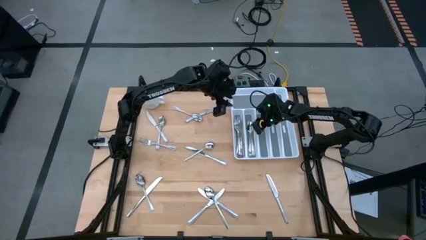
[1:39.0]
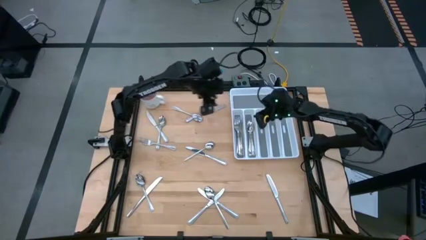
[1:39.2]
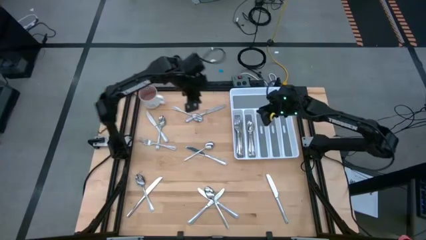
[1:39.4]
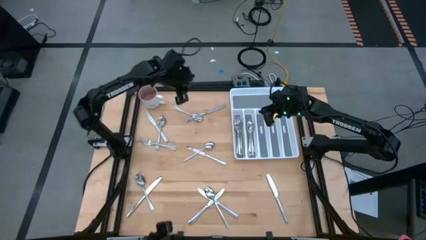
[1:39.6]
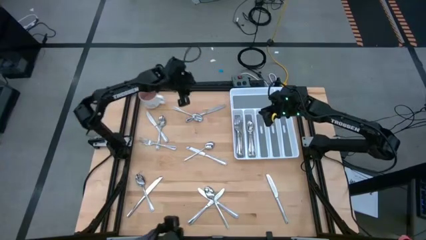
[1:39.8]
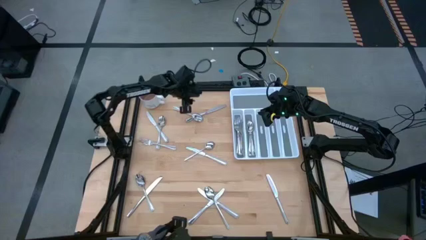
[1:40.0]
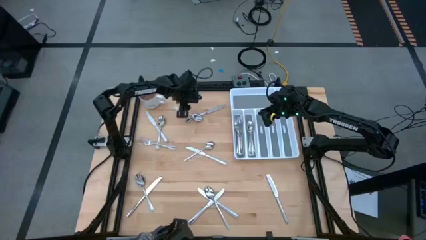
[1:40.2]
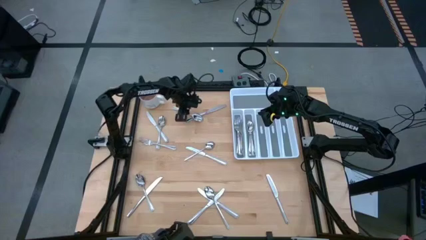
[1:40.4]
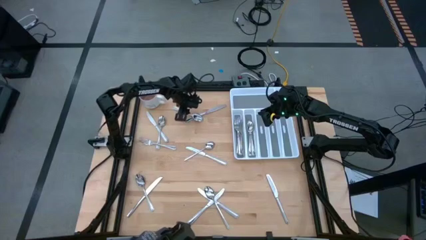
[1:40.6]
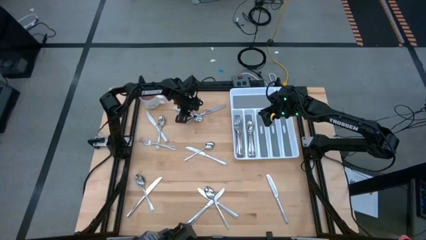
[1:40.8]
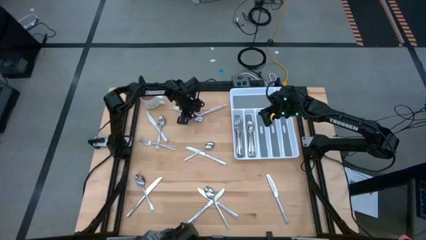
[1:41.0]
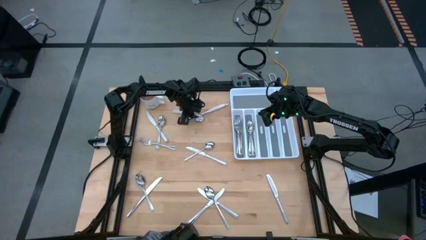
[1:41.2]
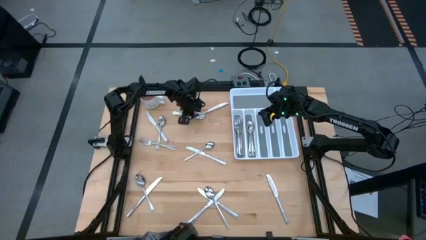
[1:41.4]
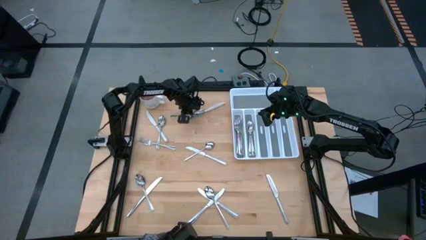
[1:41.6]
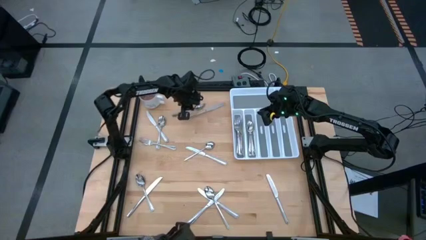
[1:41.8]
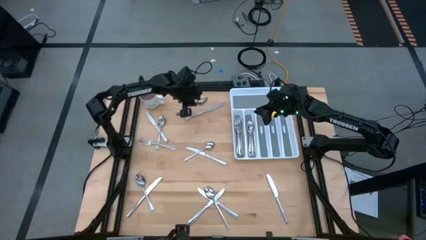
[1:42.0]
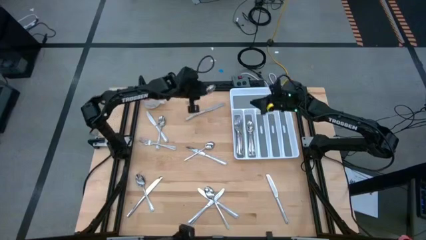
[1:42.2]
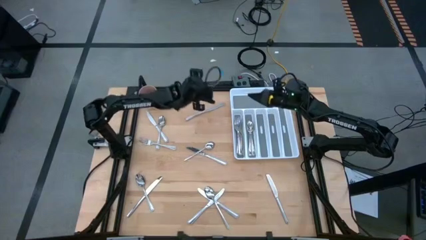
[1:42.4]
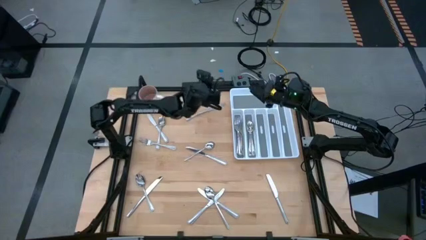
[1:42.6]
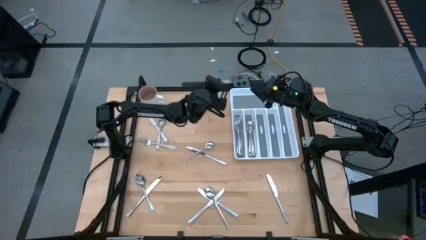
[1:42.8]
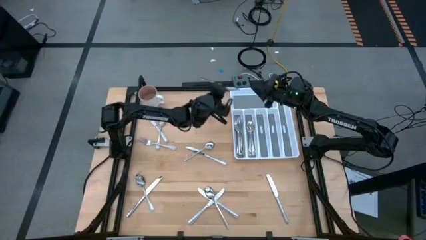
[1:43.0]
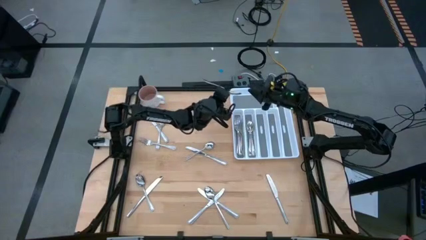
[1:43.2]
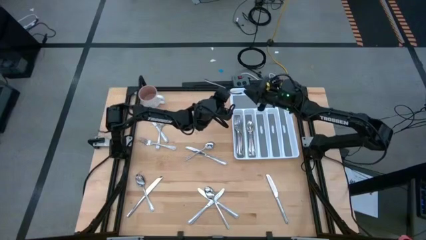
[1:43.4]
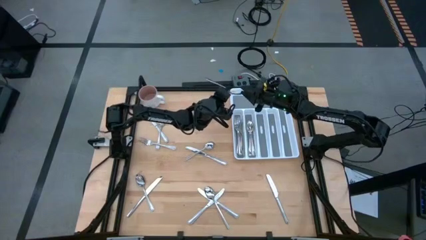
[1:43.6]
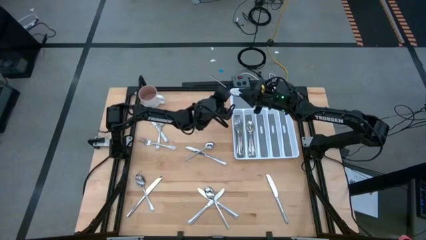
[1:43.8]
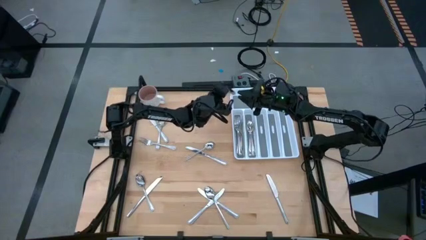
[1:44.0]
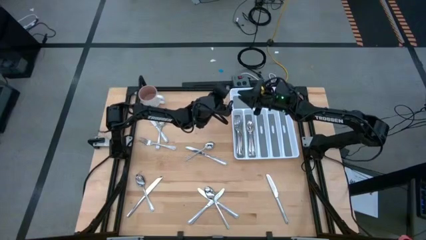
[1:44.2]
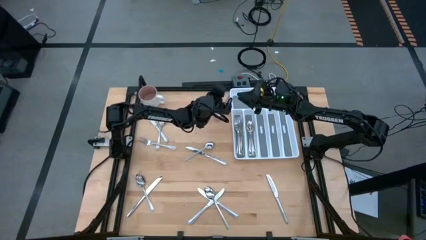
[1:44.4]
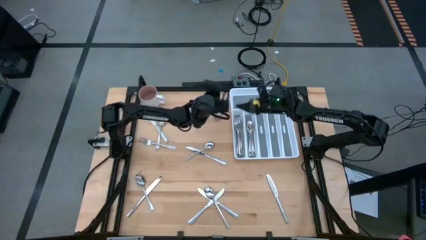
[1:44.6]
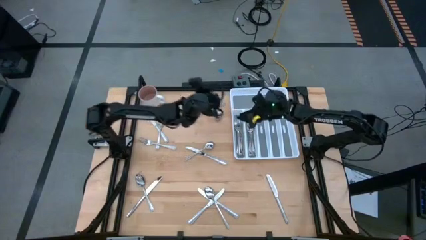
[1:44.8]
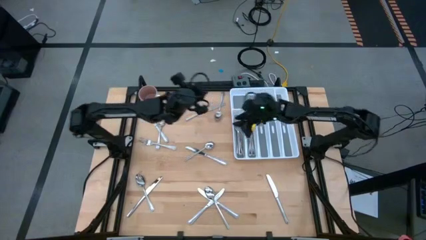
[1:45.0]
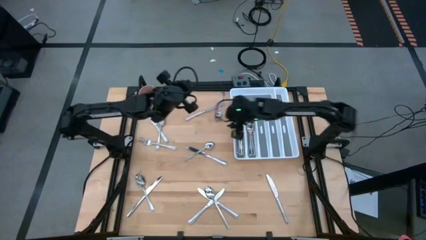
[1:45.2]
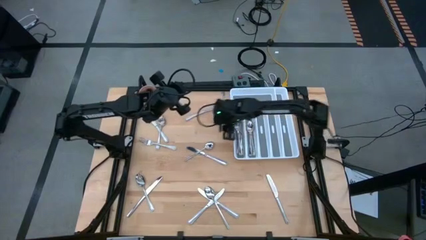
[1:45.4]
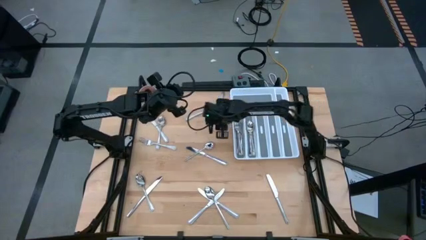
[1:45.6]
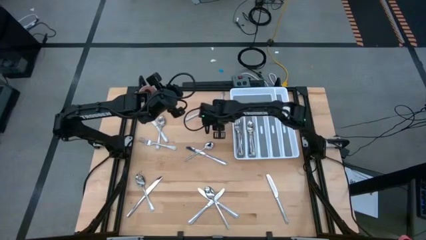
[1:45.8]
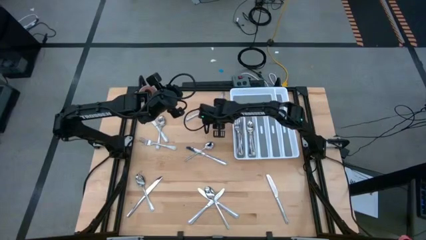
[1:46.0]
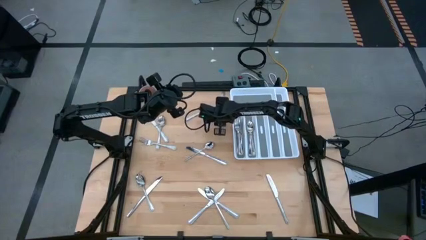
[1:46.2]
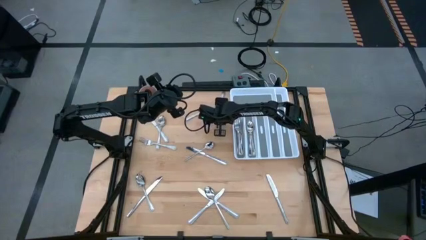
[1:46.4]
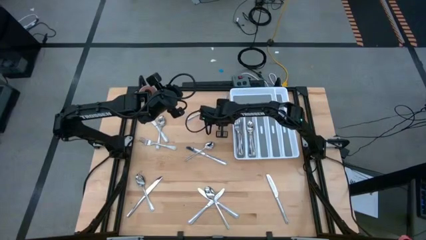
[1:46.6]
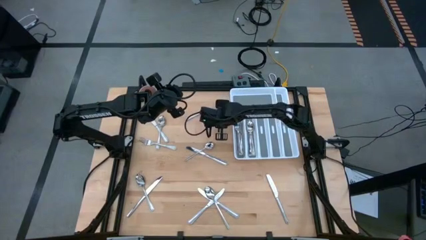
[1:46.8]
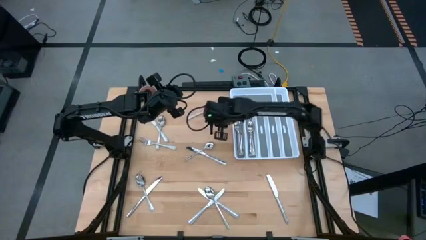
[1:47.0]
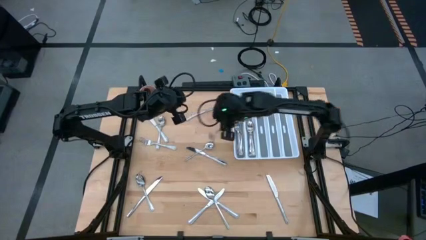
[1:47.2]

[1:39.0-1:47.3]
Task: Sort silverware
Put the silver spoon into the silverware tray

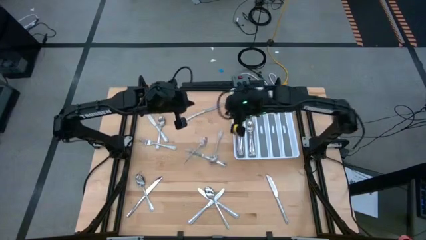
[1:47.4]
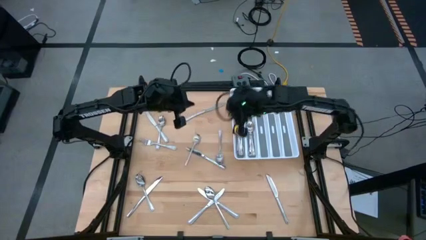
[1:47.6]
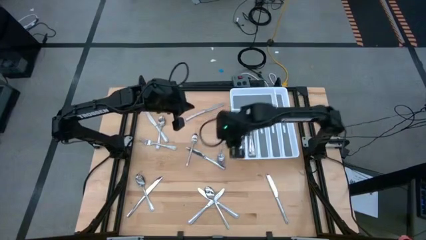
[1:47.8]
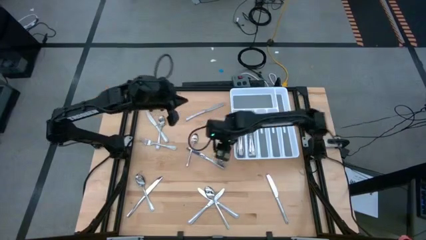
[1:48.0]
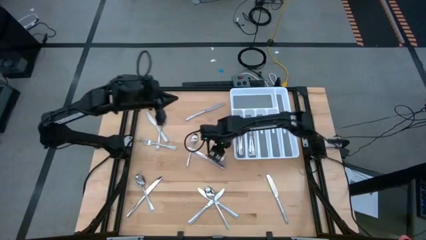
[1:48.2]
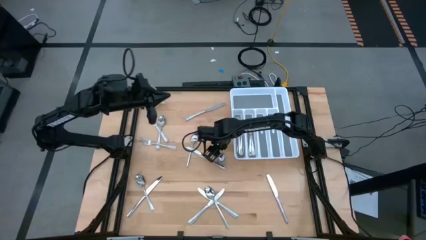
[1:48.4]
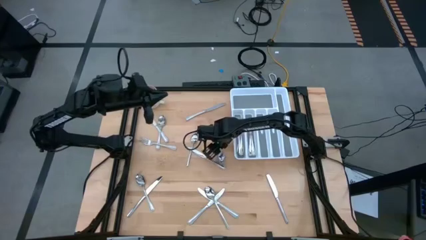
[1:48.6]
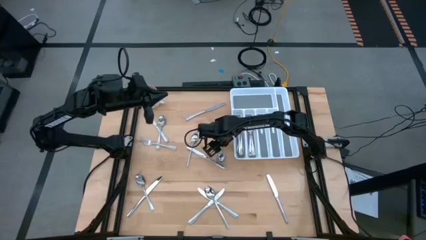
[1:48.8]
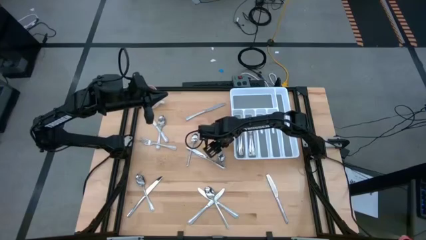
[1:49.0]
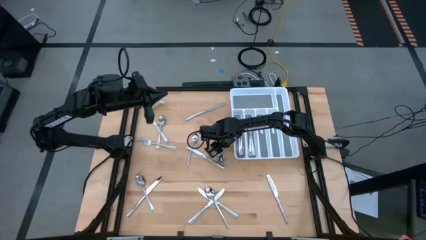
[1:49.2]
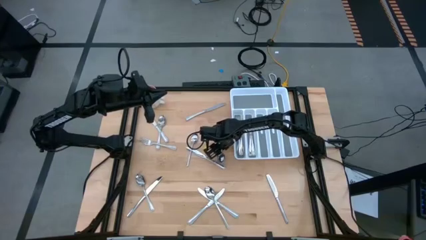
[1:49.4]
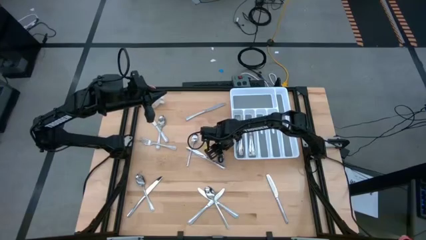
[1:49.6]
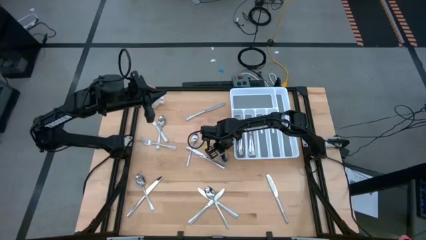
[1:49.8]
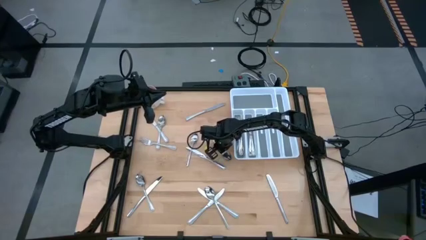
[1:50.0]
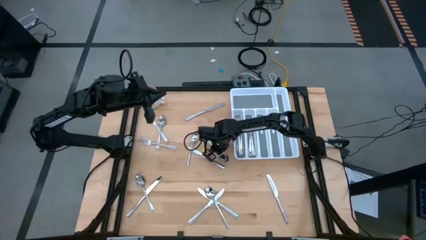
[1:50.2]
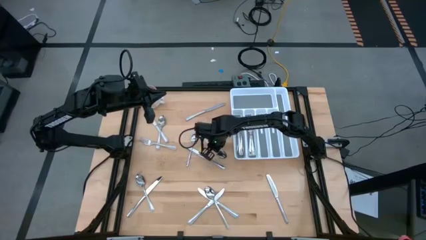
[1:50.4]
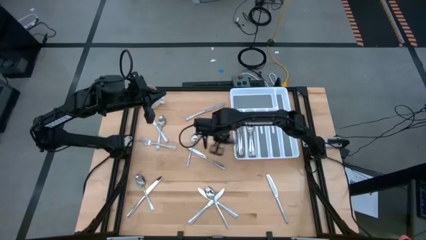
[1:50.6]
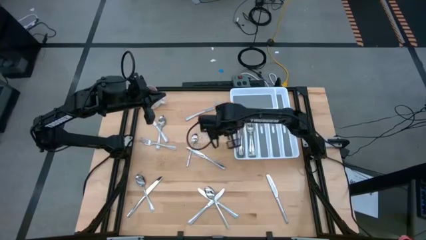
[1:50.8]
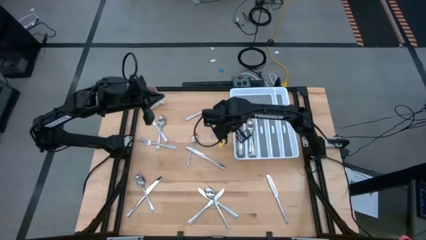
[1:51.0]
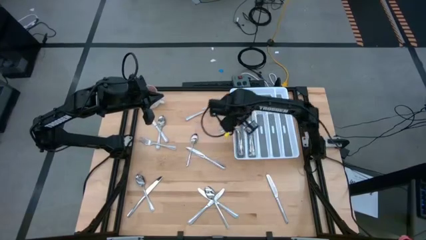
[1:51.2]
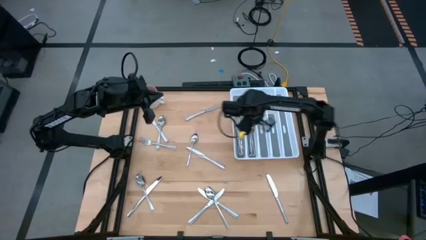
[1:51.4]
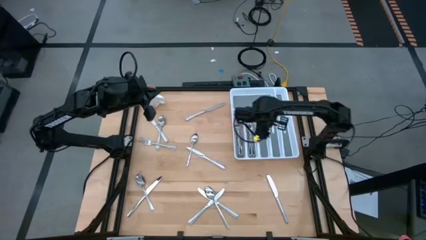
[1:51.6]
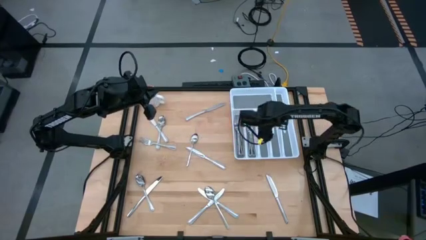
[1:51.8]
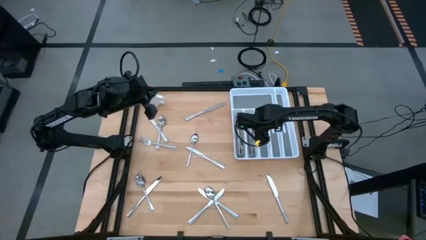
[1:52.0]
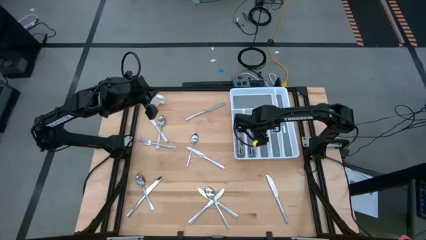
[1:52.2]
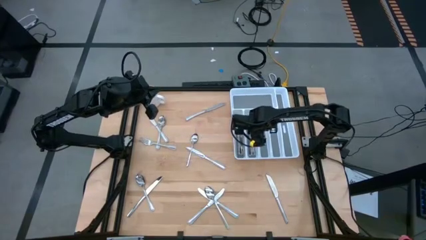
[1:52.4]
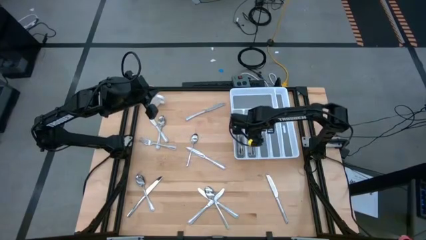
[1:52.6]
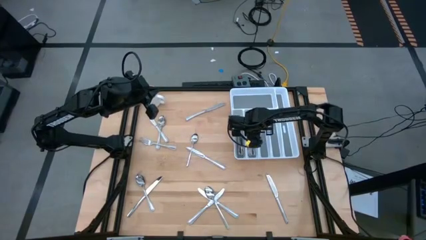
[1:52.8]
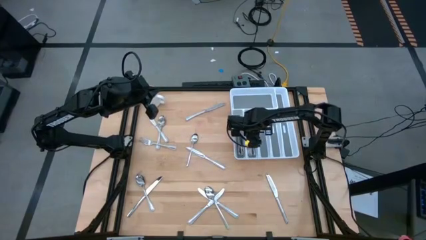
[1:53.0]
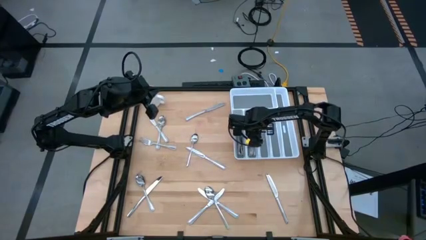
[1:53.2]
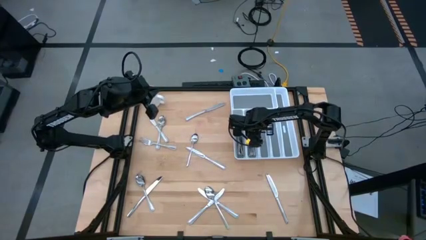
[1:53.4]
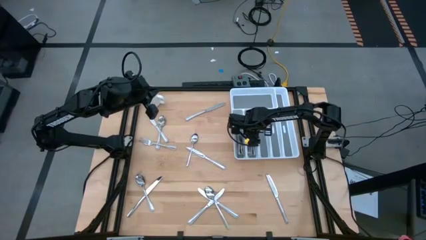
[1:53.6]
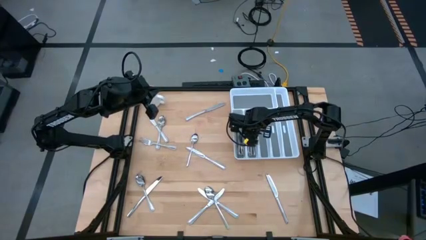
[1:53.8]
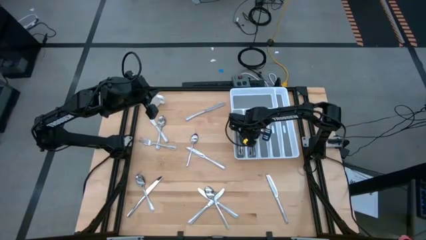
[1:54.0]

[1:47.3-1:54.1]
Put the silver spoon into the silverware tray
